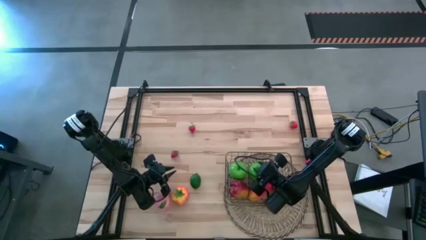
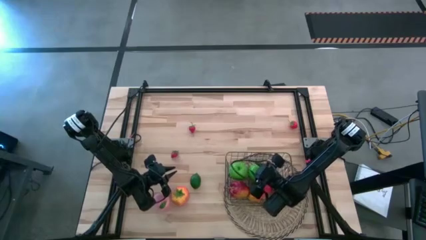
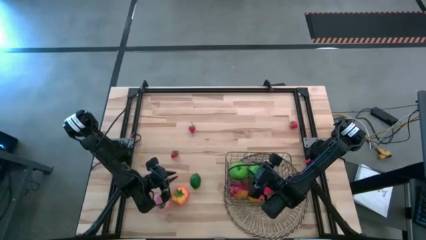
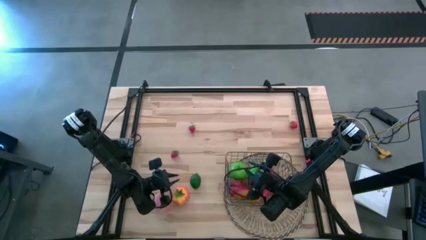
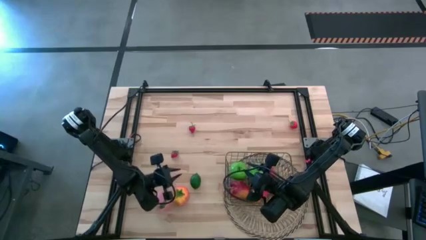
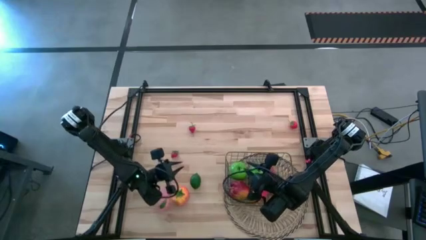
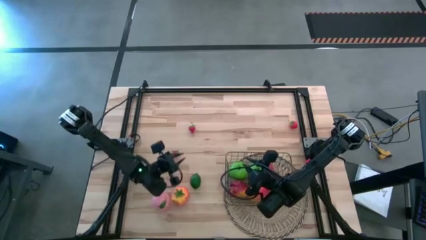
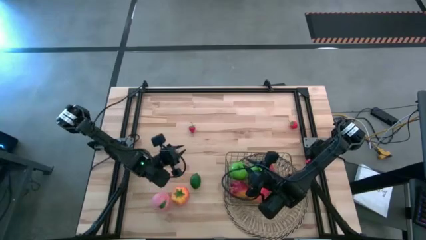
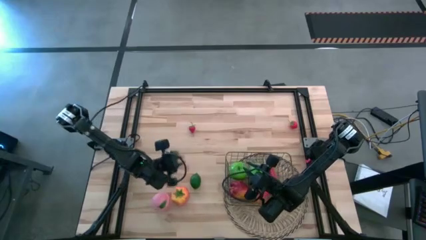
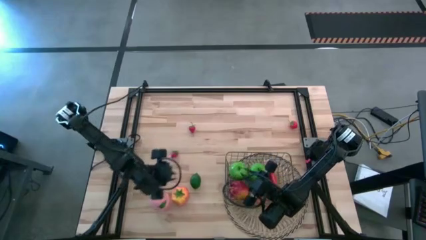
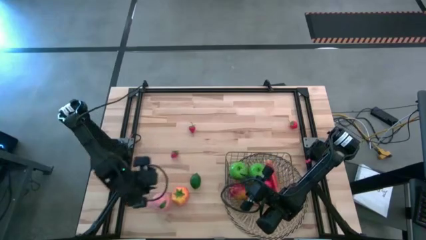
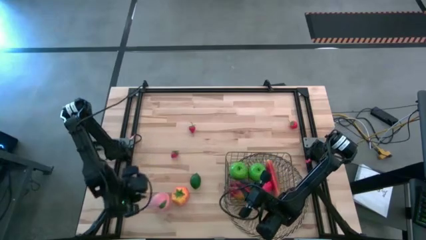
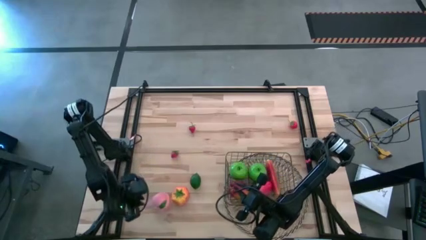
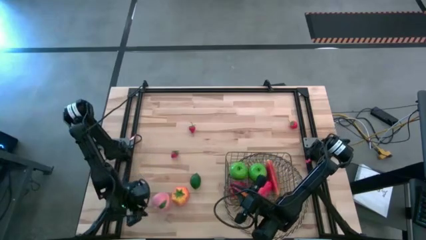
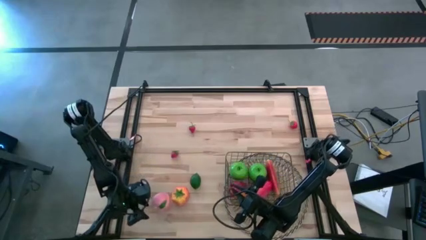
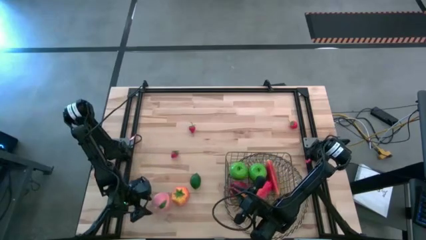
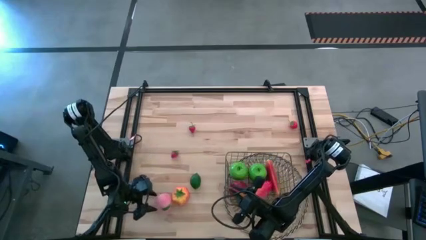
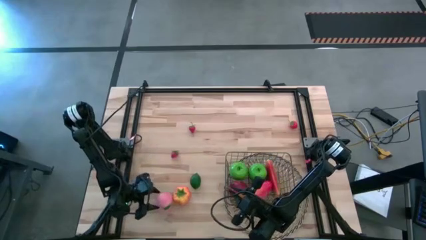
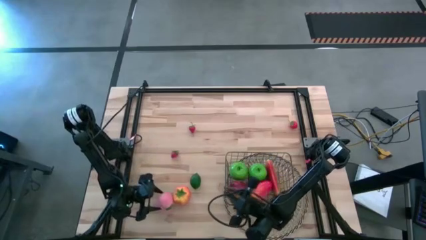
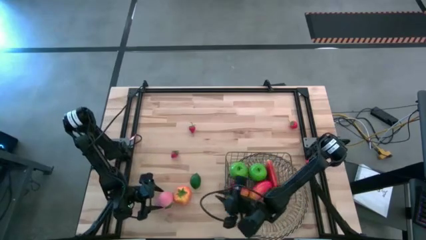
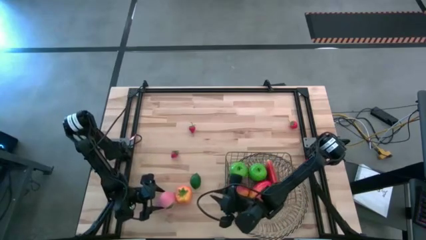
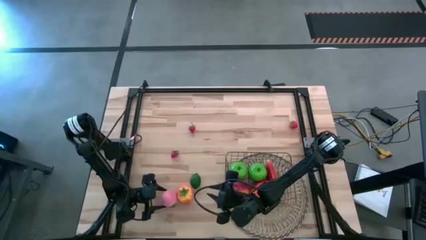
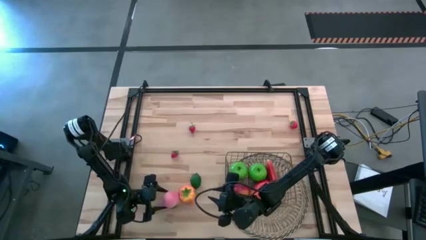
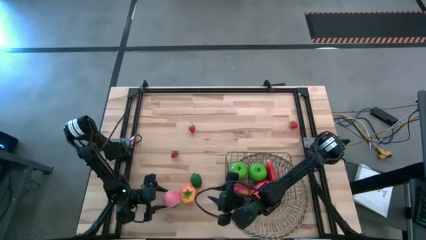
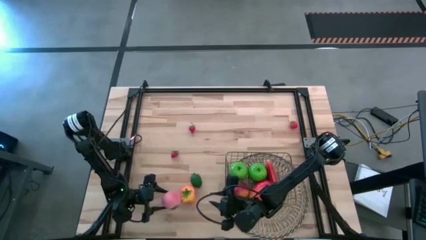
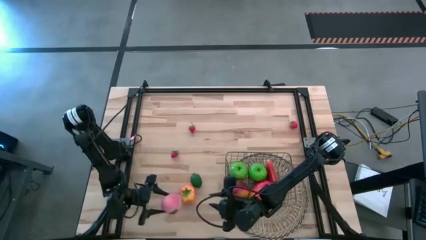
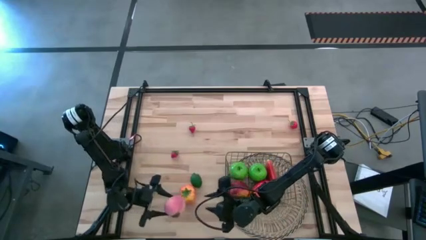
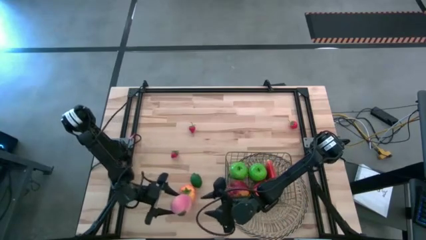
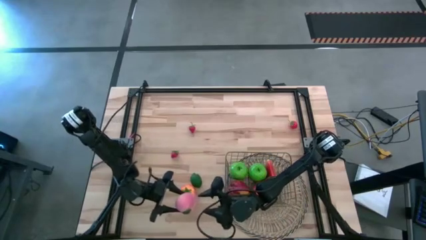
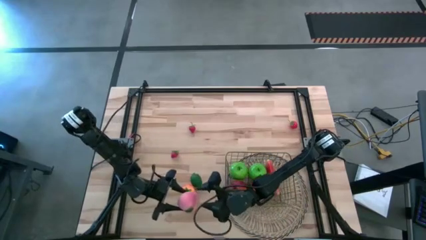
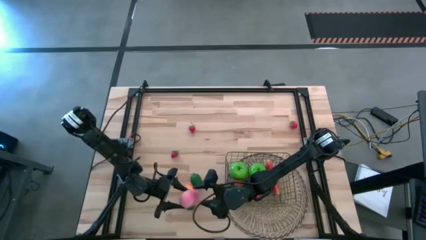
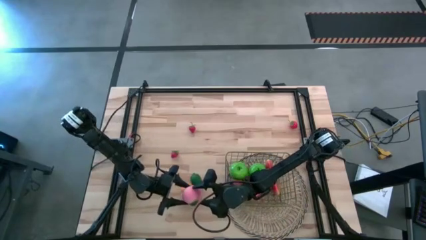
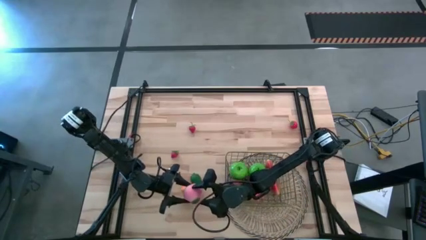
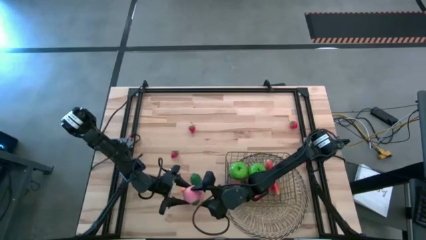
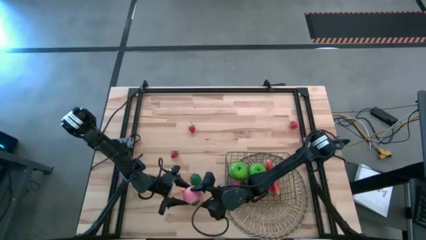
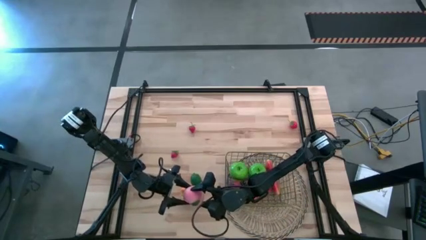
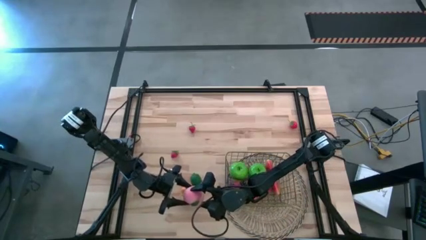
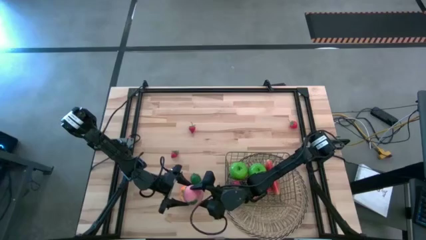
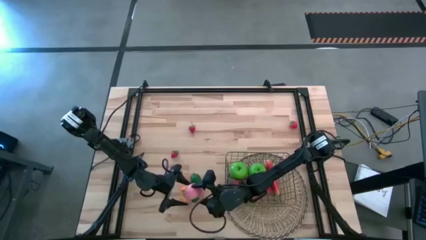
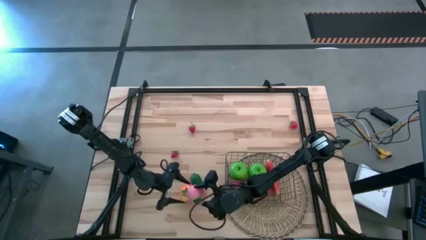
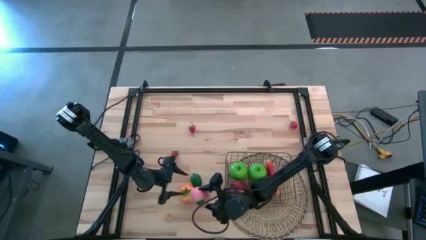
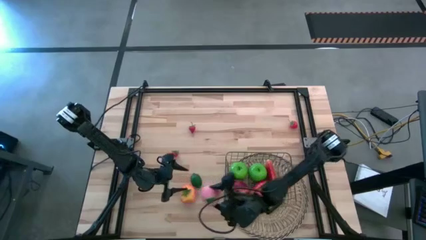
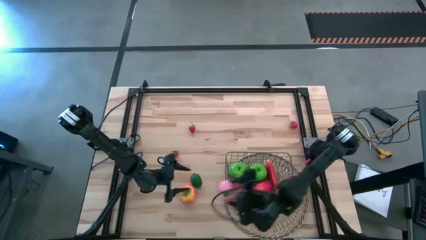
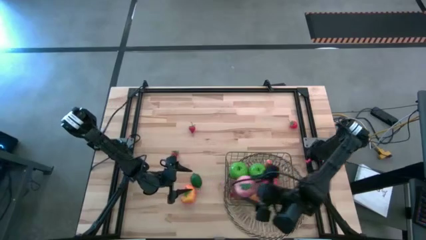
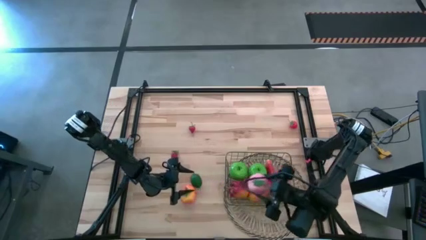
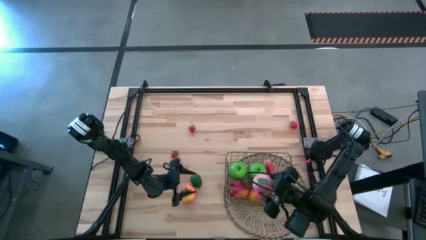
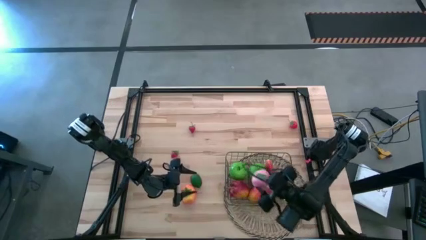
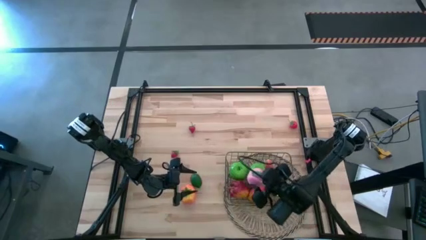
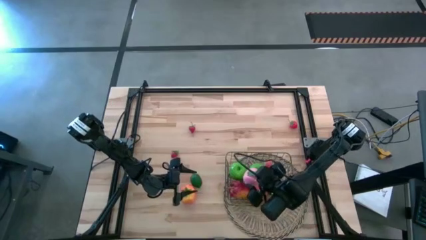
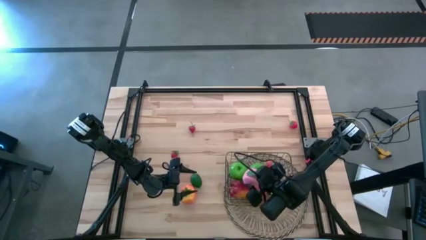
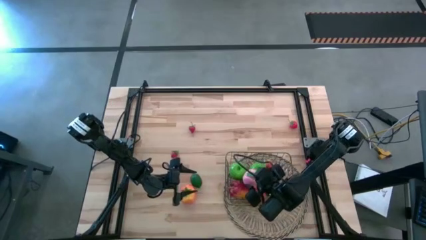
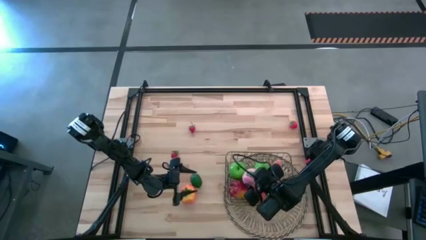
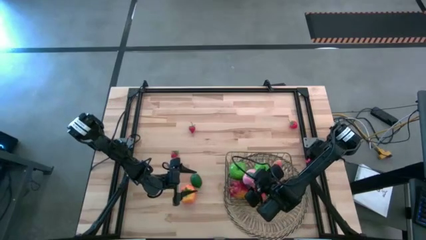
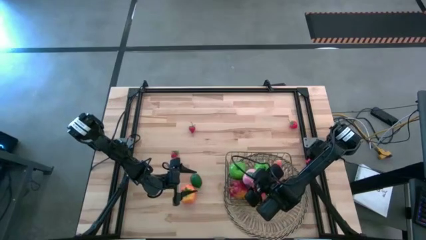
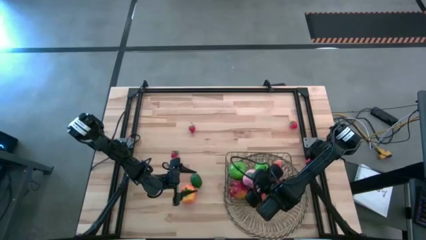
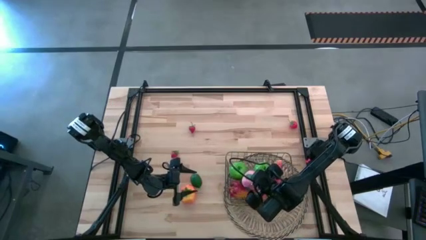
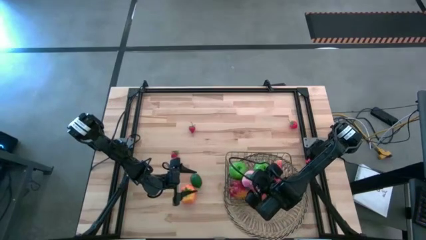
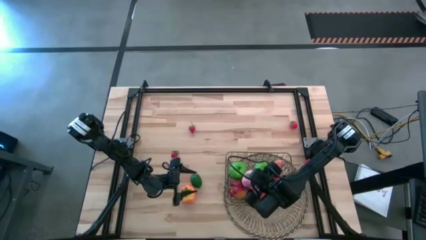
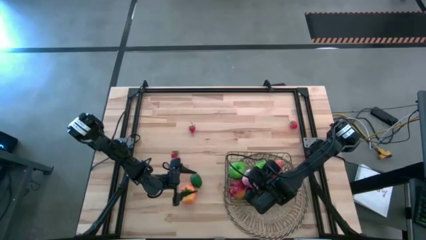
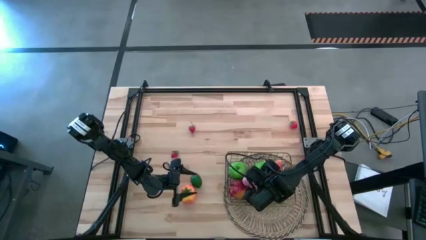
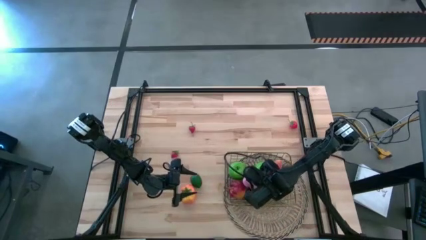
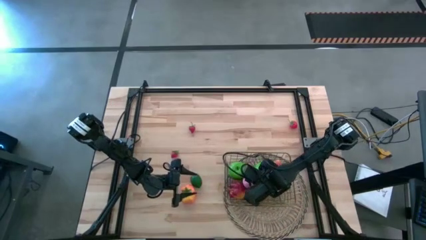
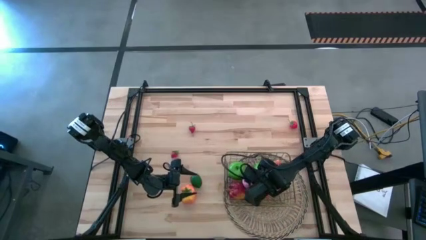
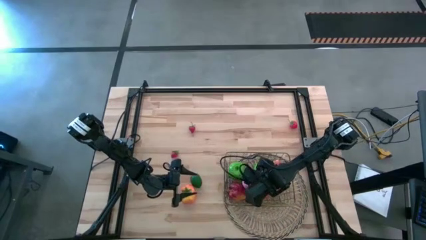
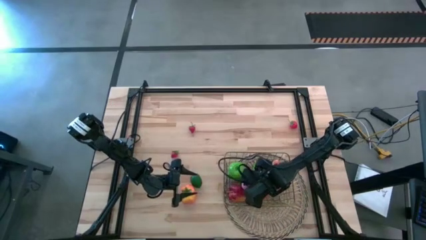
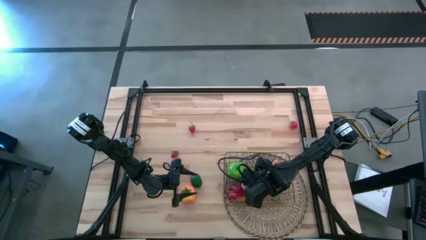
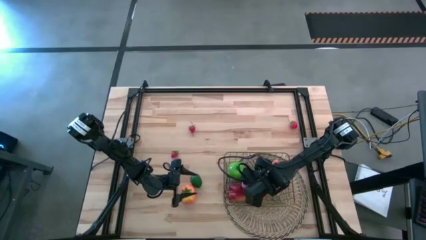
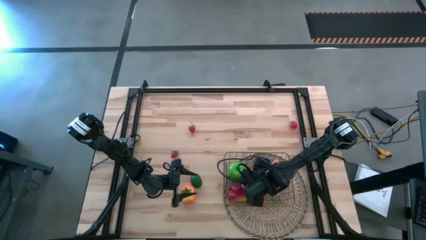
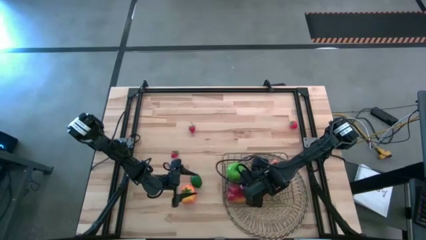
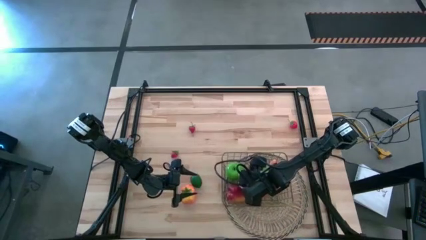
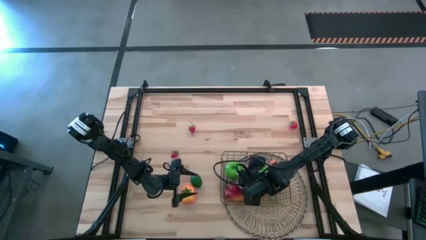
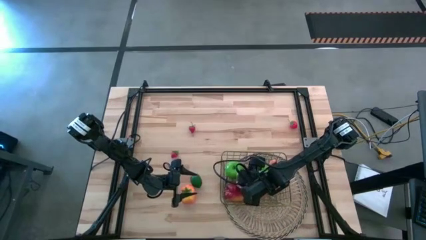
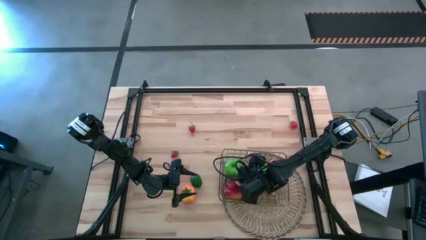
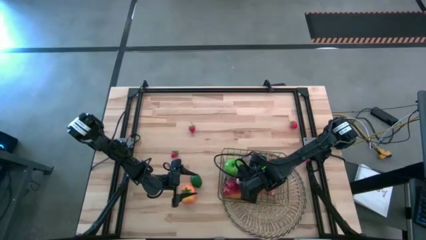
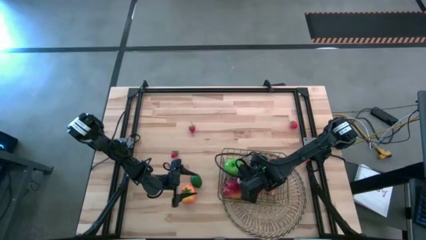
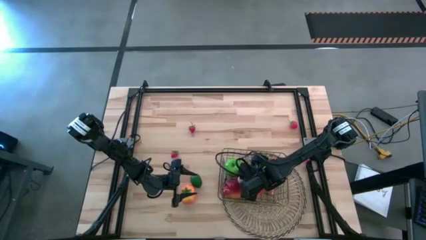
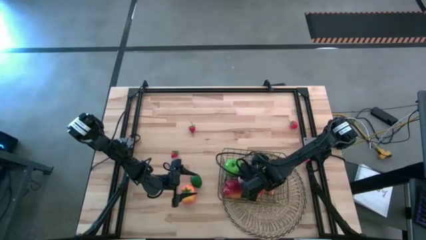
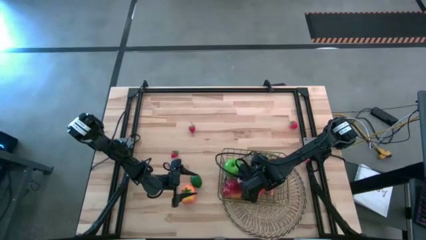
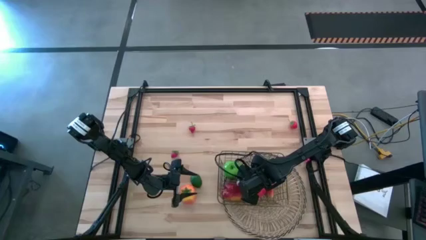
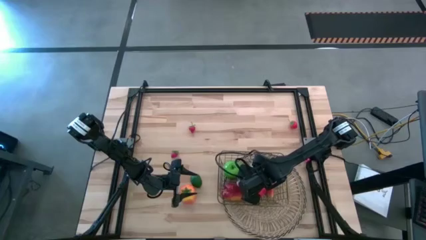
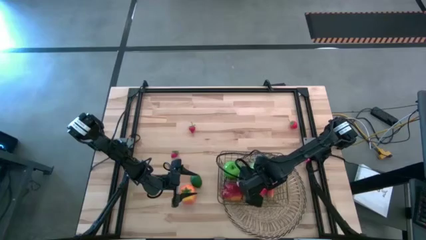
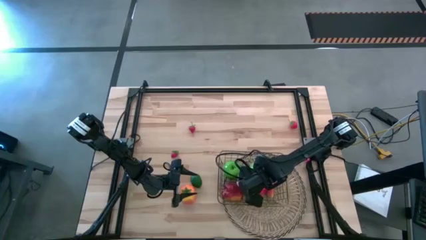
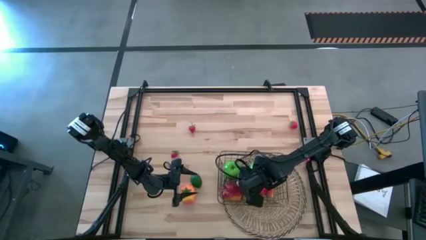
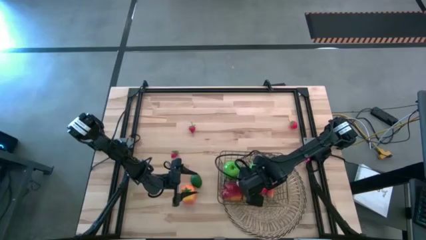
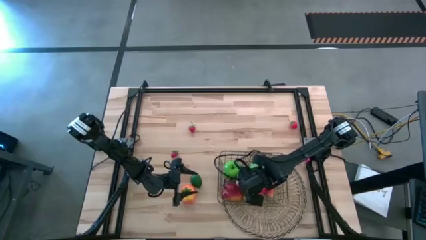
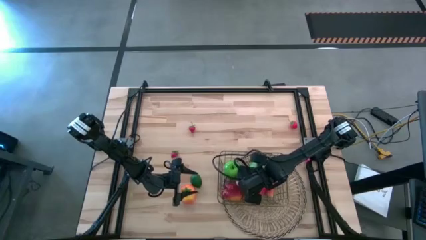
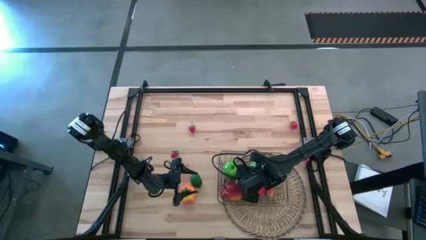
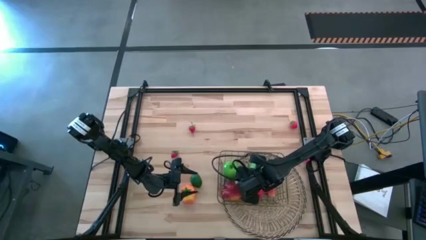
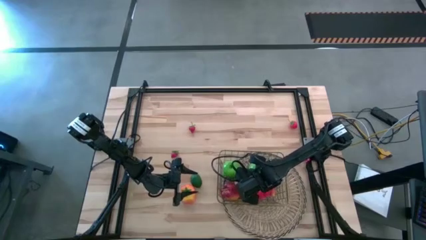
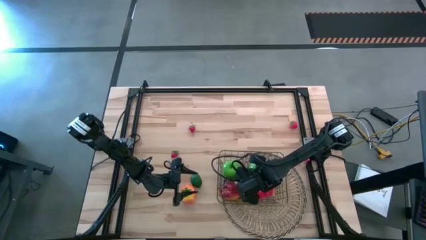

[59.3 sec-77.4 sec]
Task: Build produce basket
Put the apricot into the wire basket
